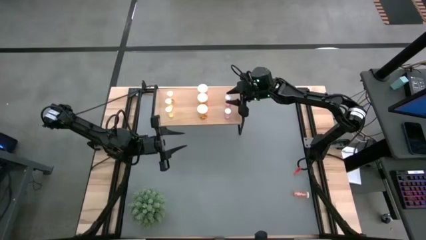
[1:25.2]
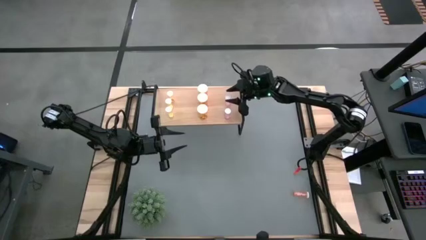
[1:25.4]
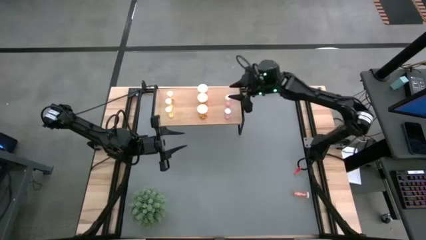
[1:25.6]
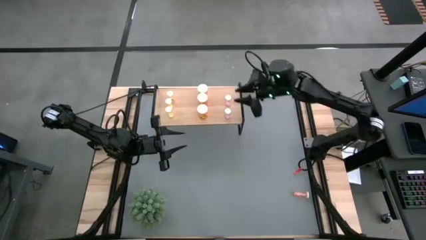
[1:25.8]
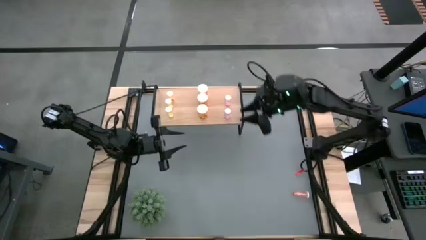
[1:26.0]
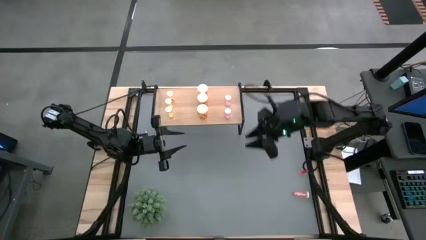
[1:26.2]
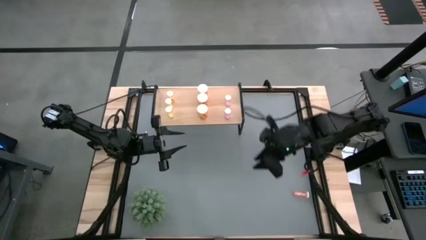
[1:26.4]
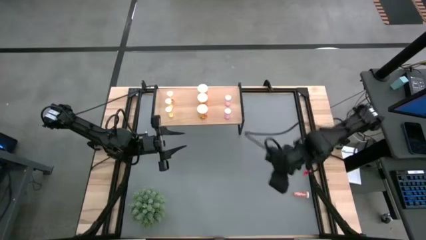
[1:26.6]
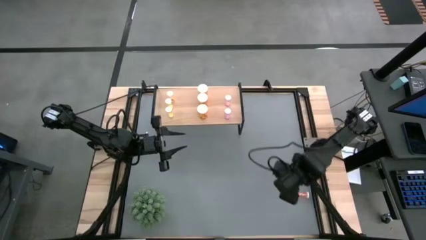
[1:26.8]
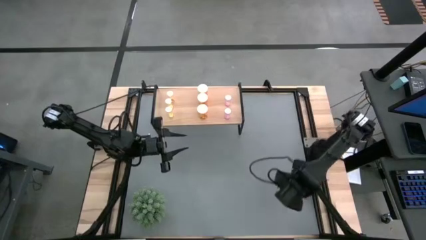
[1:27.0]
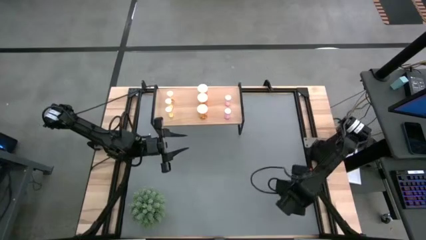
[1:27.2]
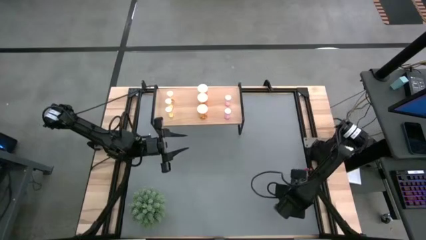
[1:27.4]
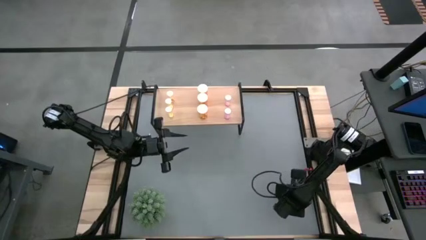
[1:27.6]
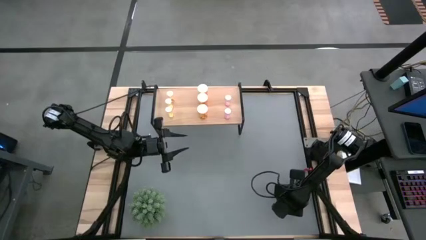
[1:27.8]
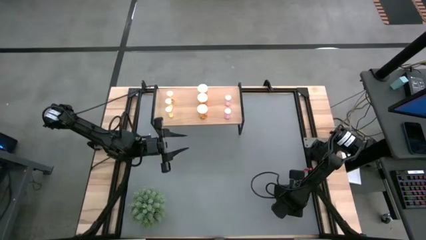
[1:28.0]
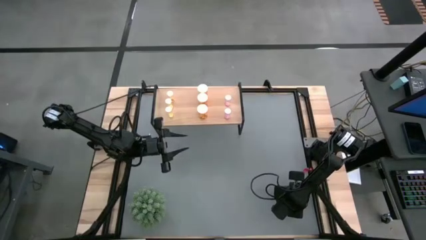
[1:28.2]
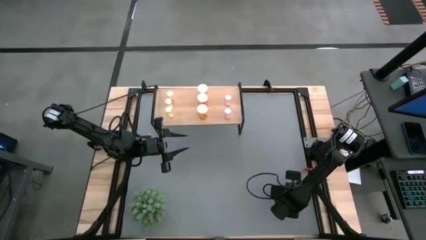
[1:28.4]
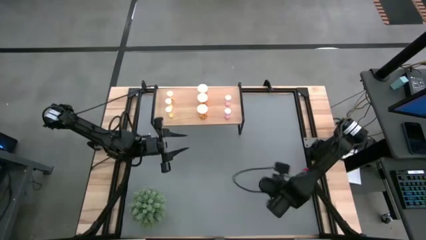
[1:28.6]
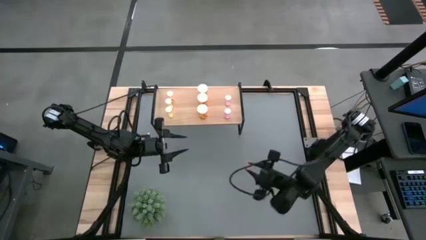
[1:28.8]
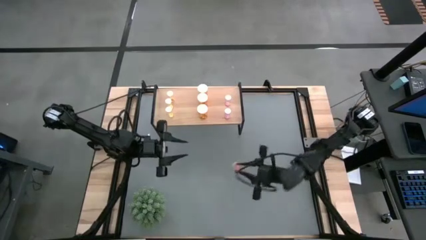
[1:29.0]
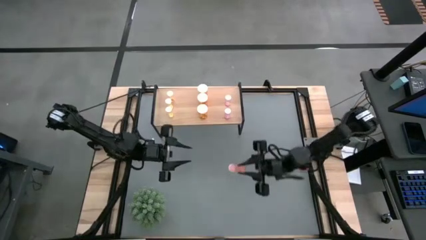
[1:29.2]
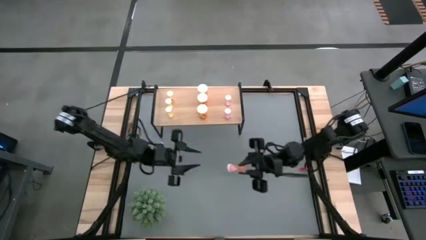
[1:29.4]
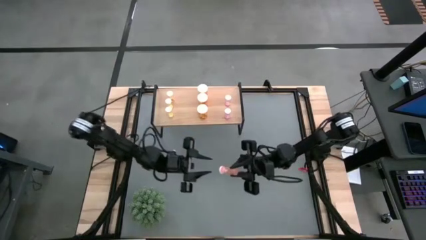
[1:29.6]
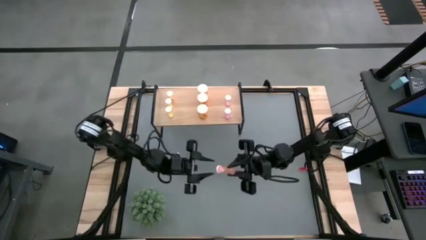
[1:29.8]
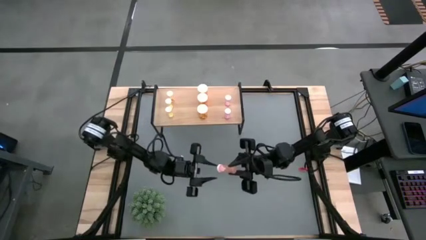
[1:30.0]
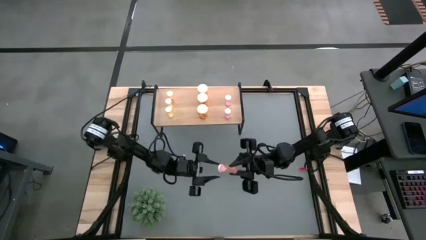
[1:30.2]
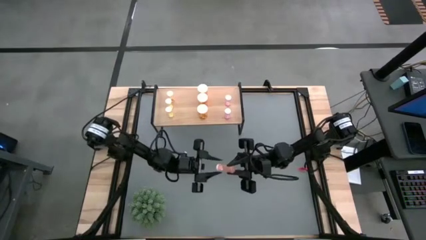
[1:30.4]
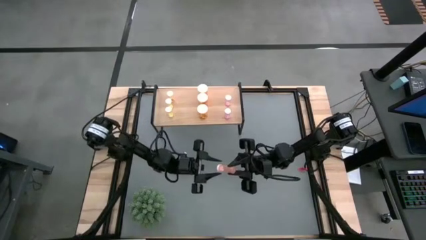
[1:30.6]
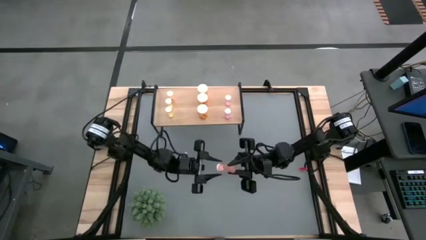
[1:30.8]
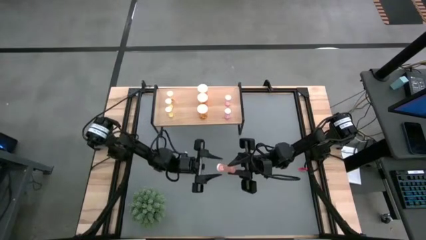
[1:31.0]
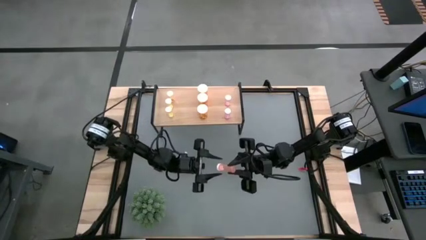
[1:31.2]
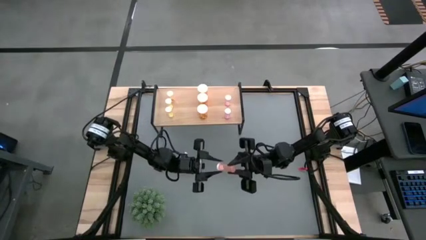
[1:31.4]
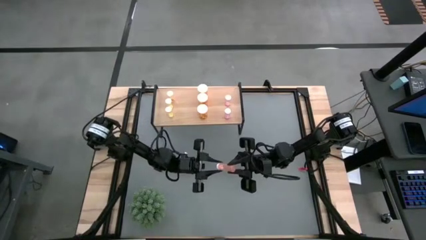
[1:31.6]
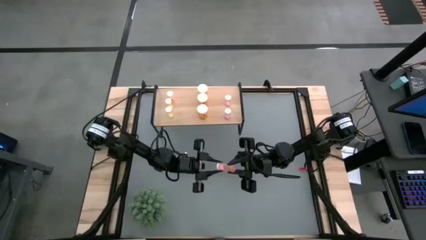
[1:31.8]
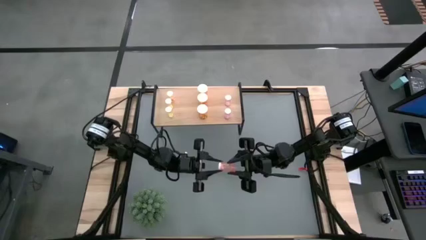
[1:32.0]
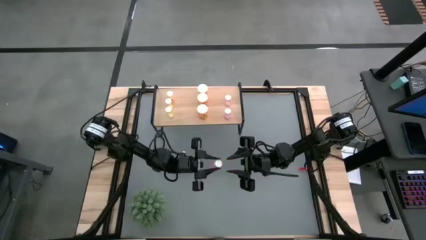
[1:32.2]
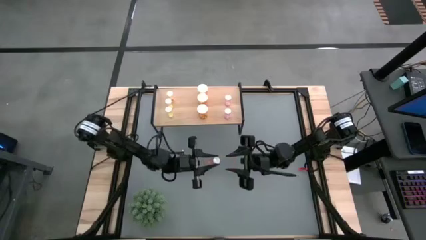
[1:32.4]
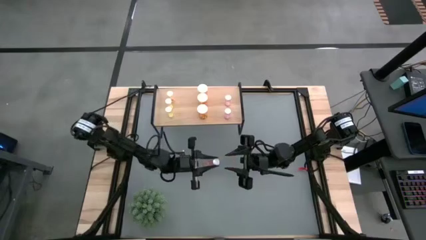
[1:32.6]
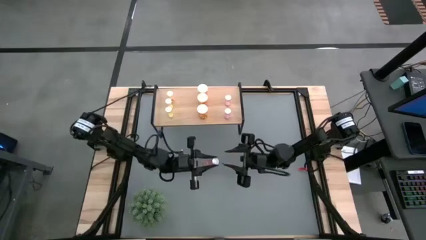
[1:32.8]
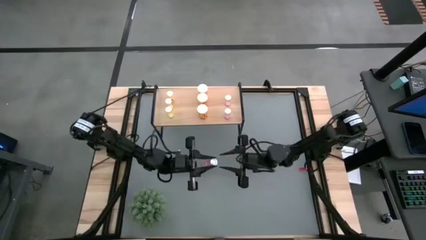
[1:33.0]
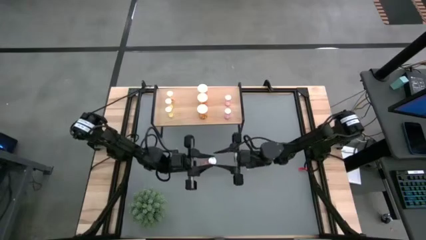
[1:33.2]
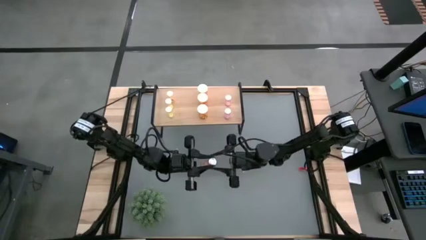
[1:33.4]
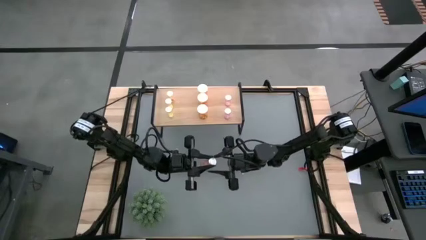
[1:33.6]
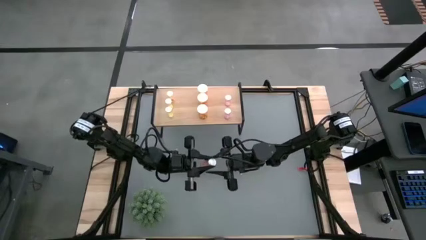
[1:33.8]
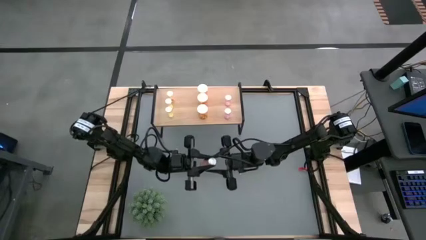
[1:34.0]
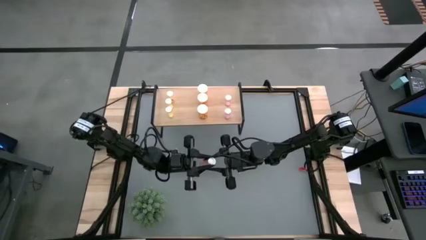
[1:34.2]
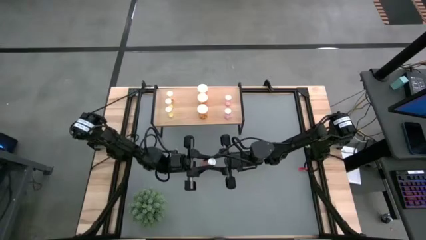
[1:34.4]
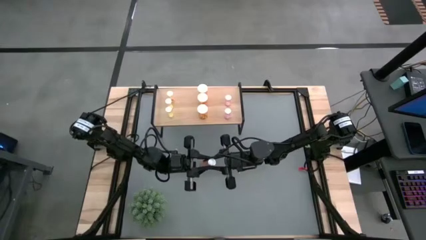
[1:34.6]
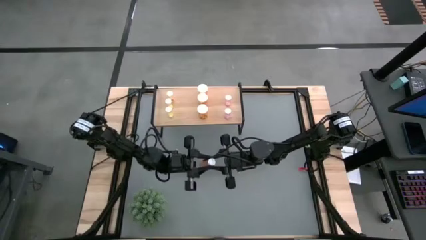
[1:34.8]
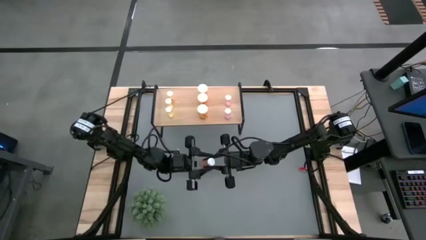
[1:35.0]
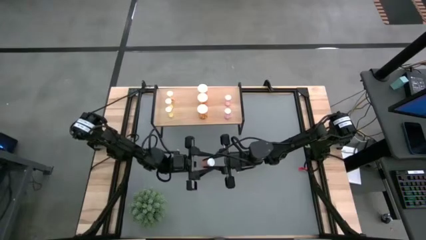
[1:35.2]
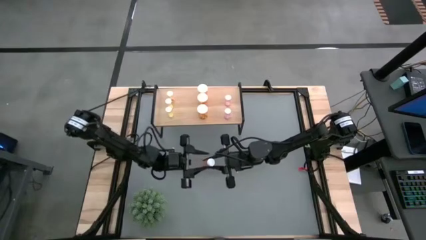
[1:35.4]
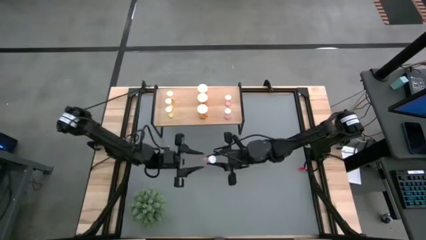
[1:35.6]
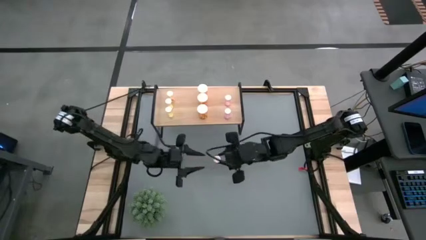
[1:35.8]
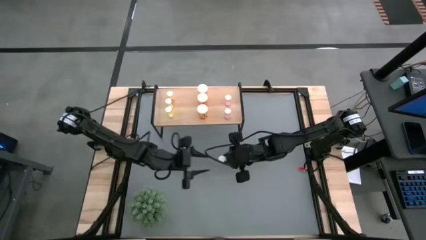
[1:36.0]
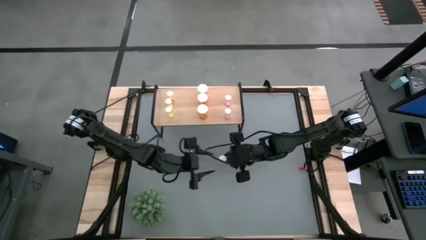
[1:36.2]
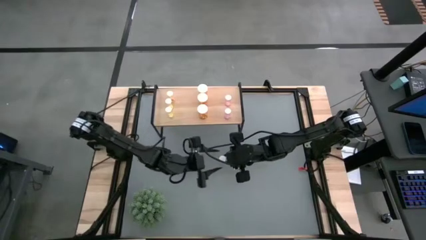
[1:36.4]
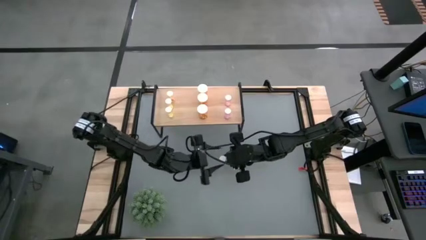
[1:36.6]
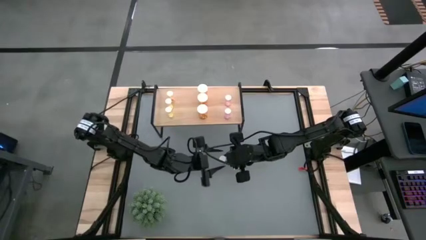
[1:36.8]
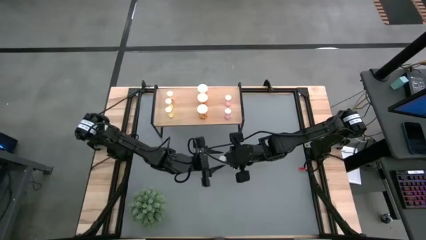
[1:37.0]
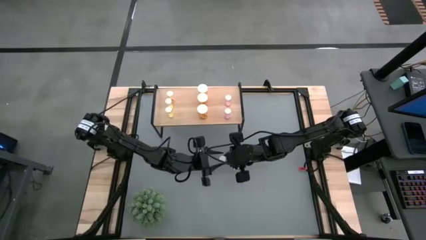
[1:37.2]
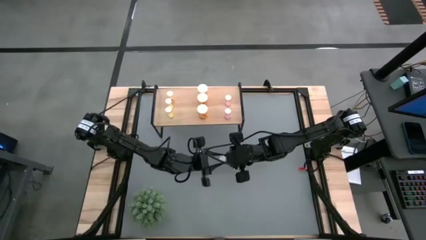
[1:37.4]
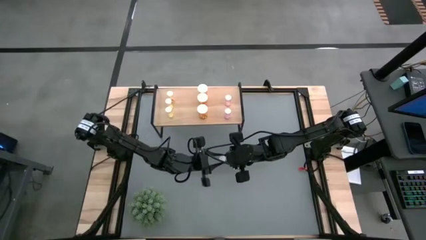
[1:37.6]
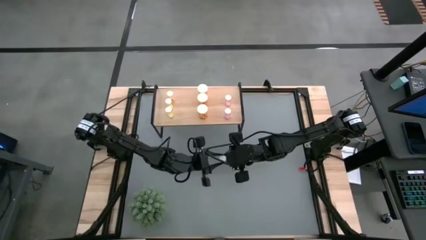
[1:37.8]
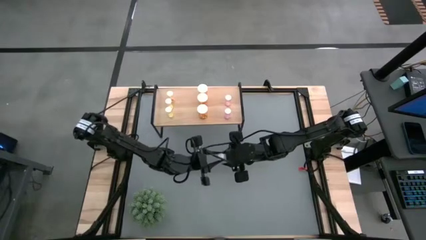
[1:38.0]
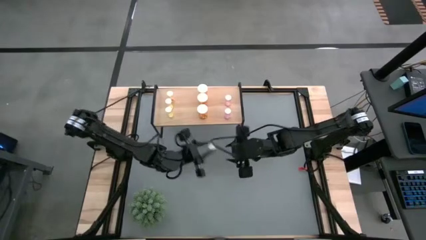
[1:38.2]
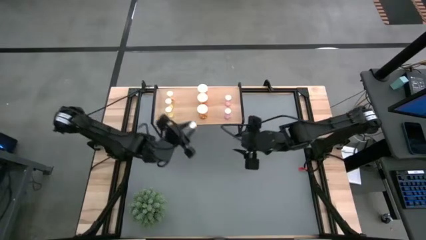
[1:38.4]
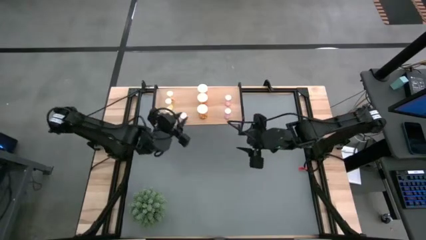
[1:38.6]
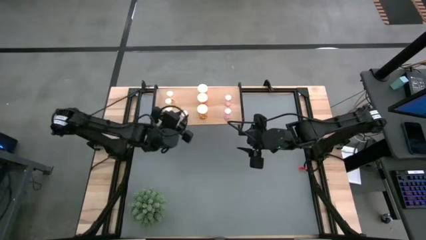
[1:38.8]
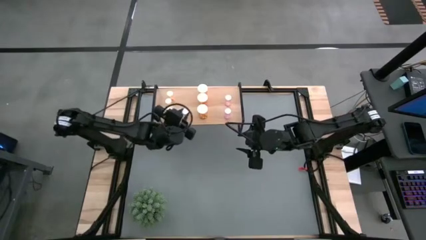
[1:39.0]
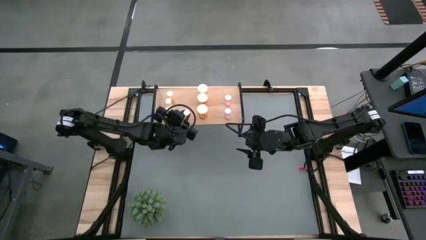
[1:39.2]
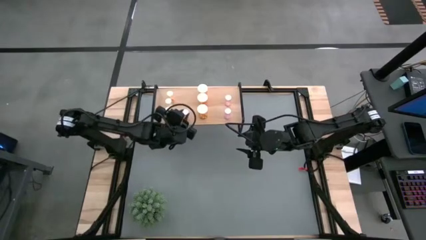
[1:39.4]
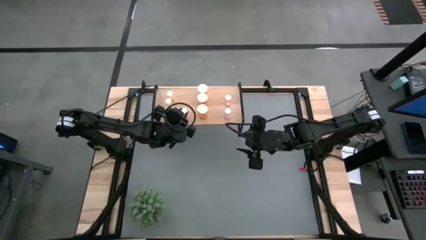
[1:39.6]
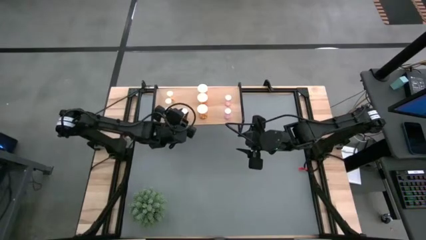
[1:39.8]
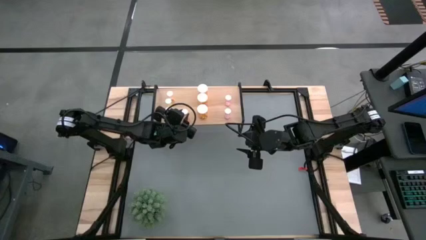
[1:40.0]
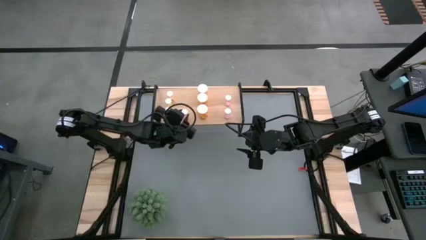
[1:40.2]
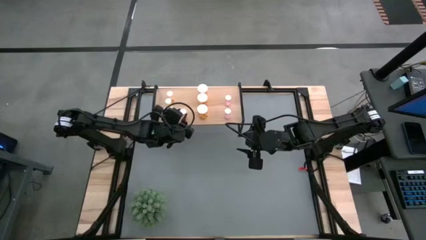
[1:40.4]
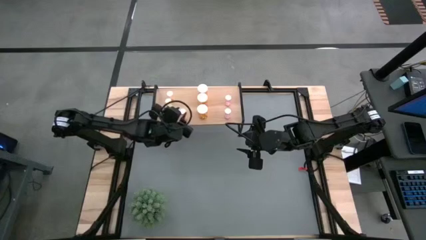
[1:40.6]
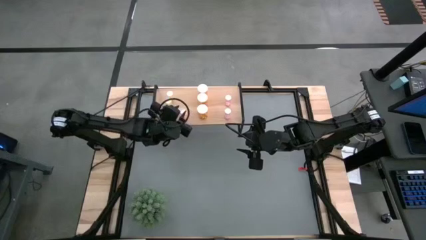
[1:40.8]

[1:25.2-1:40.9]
Task: Pick and place medicine bottles onto shelf by color
Put the red pill bottle on the shelf
